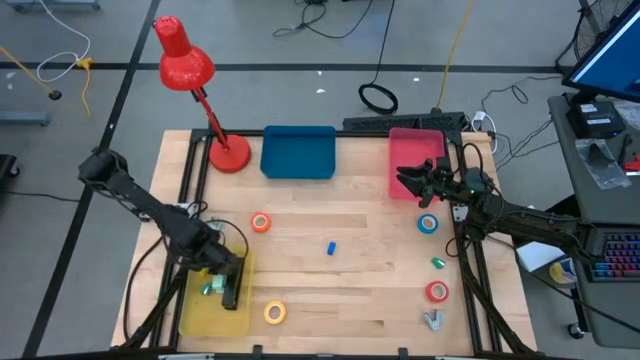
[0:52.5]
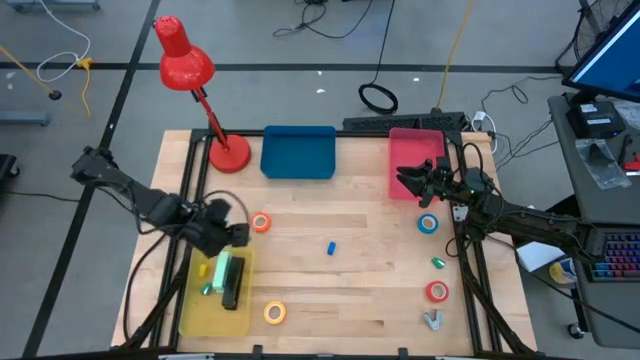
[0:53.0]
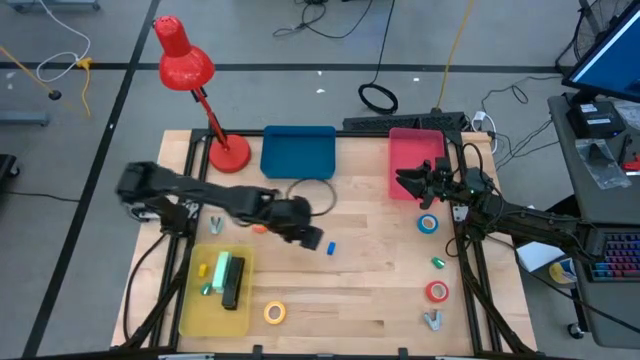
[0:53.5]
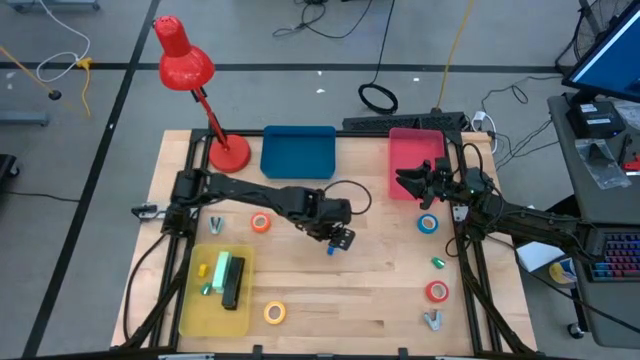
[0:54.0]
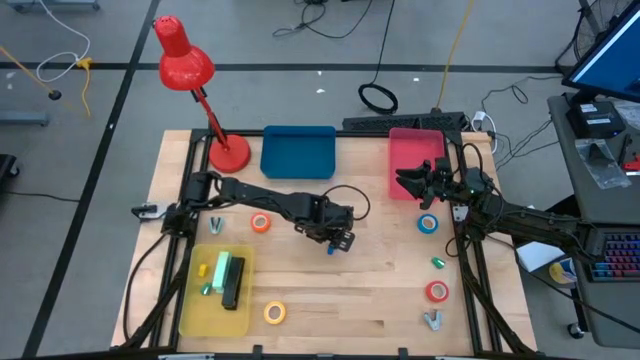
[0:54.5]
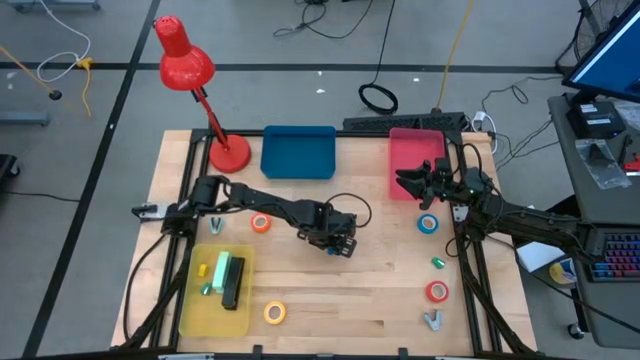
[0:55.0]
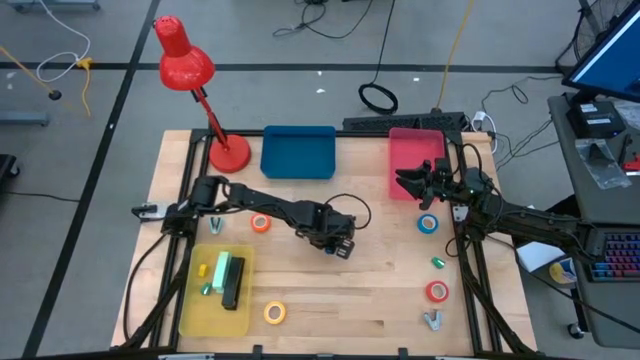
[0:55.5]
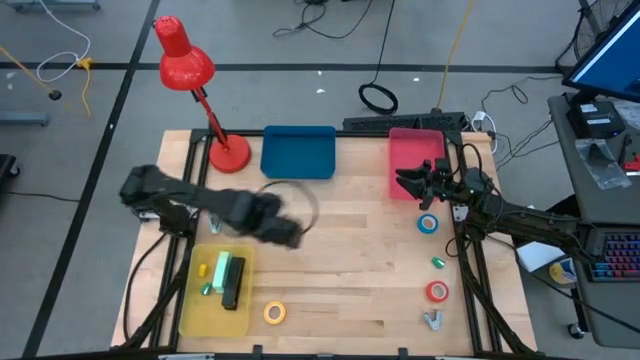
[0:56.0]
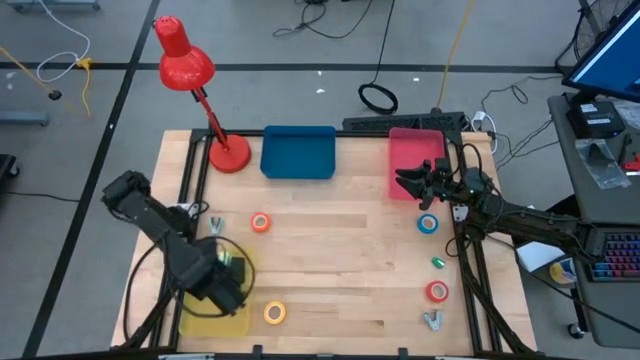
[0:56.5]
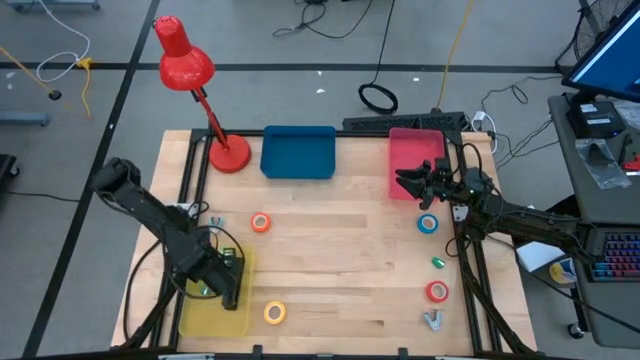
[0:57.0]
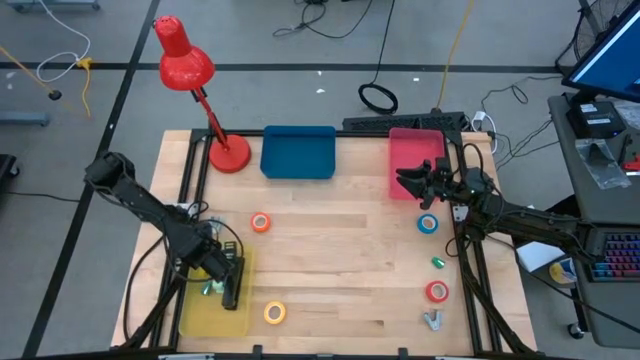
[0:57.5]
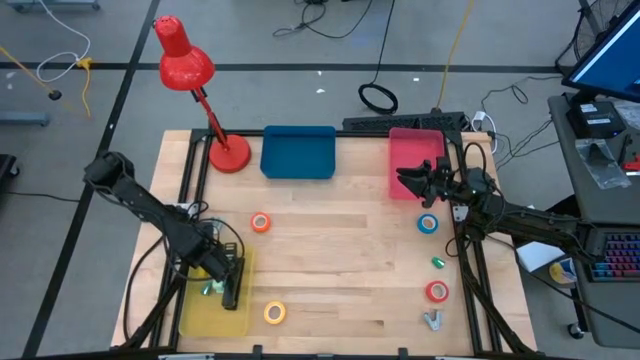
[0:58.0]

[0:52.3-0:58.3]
Task: Pick and place Stapler, Stapler remover, tape
Put the blue stapler into the yellow bin

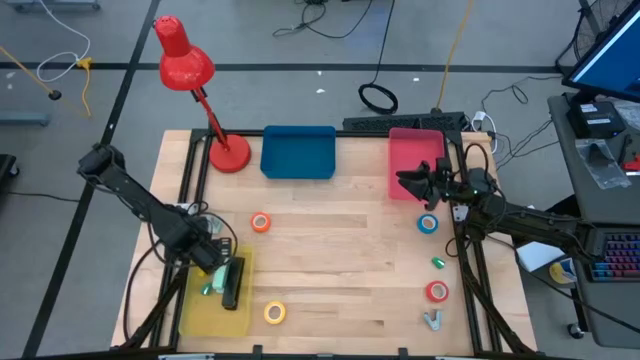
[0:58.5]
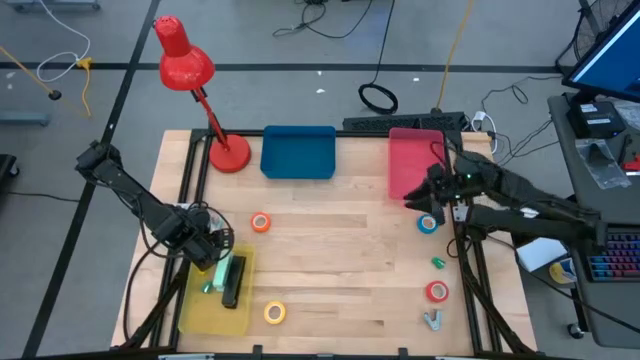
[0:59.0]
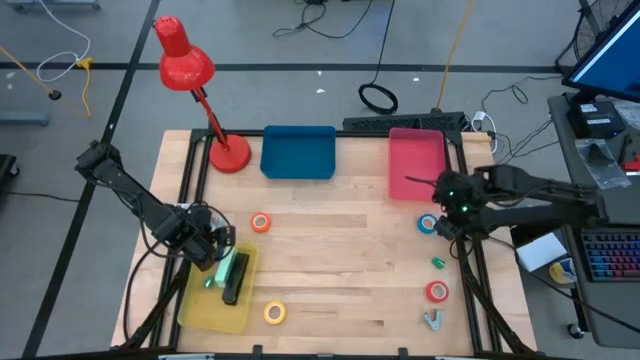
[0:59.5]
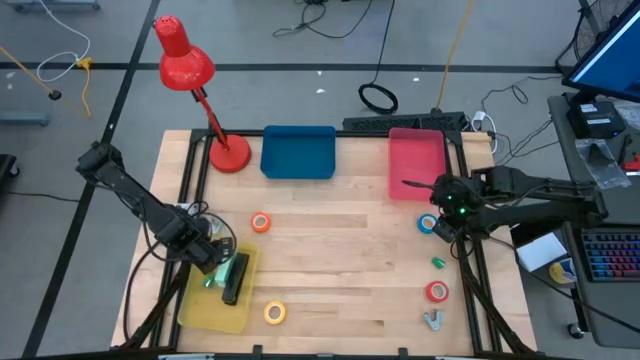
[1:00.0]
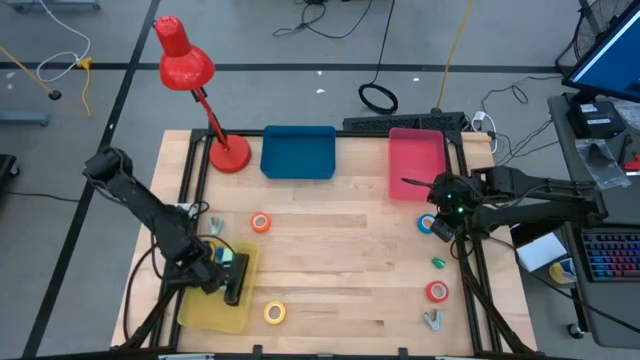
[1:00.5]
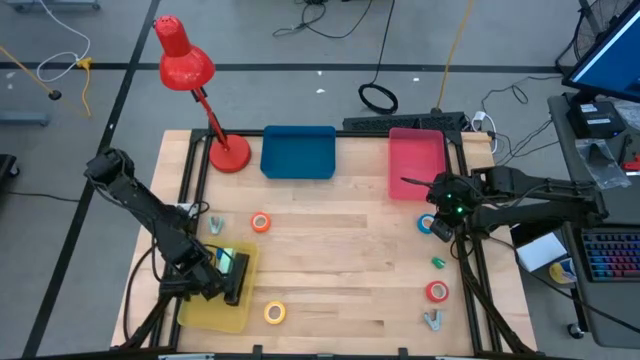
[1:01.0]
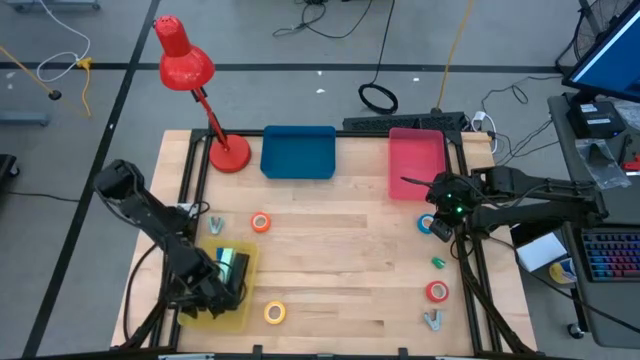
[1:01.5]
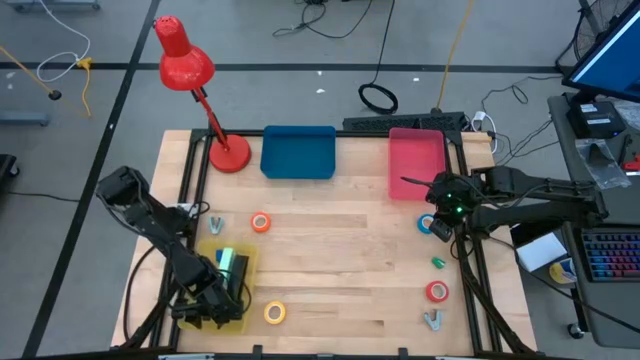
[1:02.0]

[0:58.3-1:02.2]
Adjust the yellow bin on the table

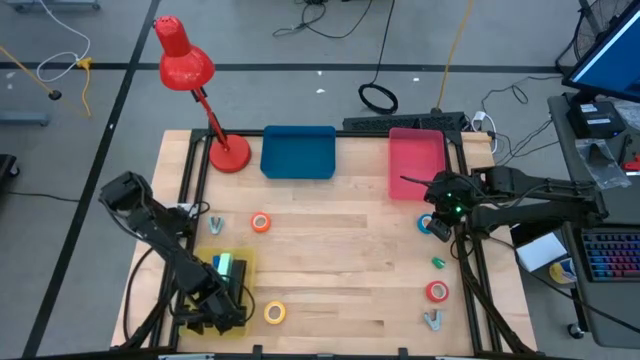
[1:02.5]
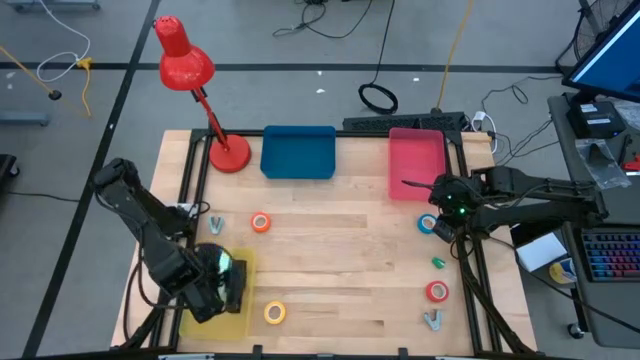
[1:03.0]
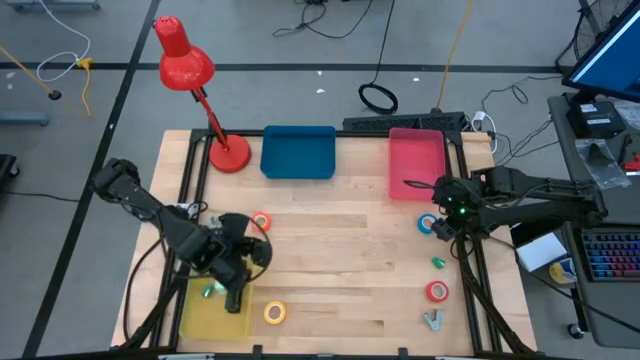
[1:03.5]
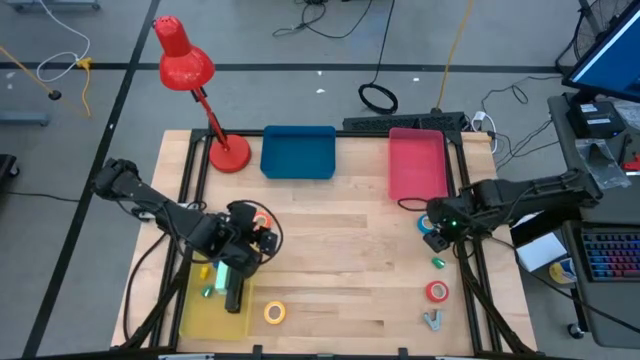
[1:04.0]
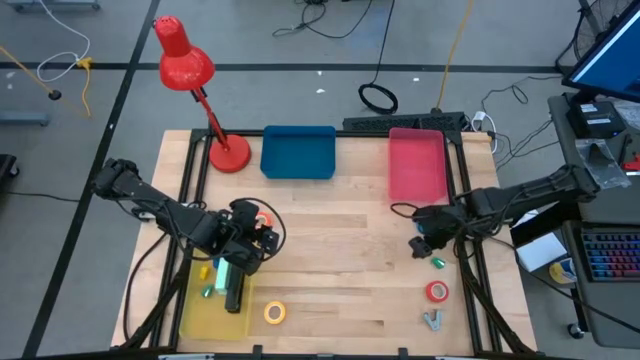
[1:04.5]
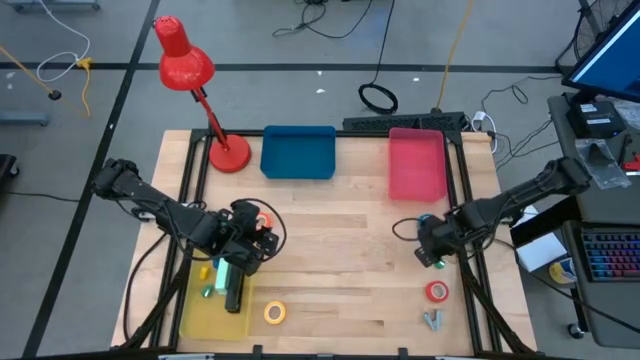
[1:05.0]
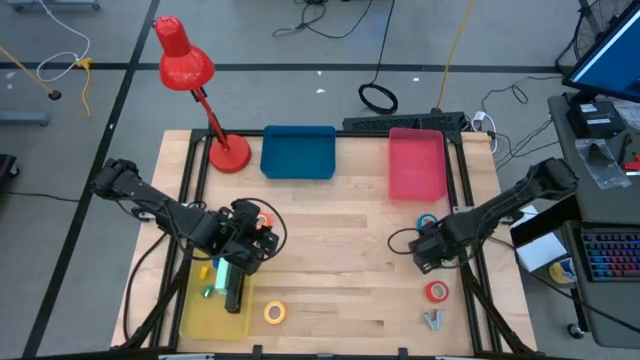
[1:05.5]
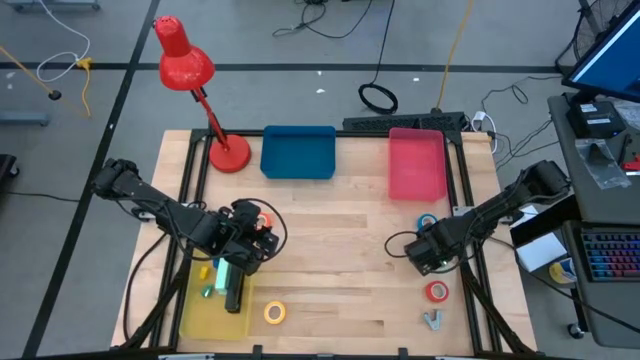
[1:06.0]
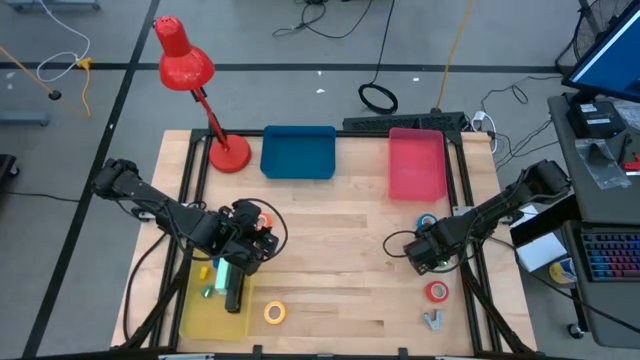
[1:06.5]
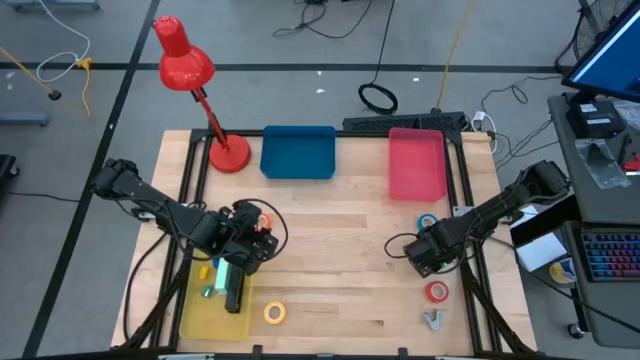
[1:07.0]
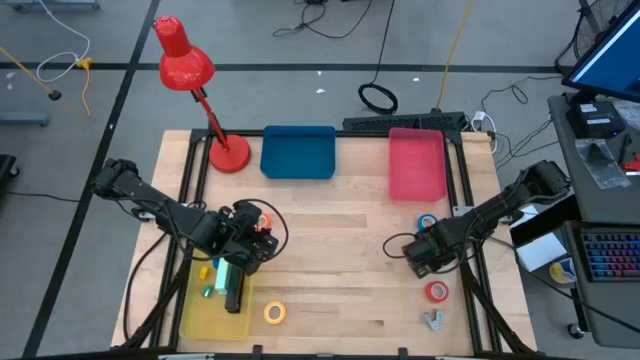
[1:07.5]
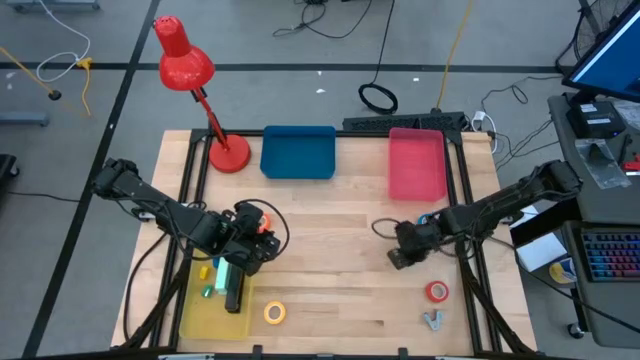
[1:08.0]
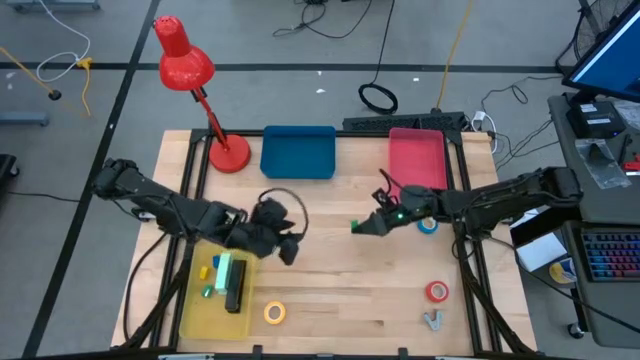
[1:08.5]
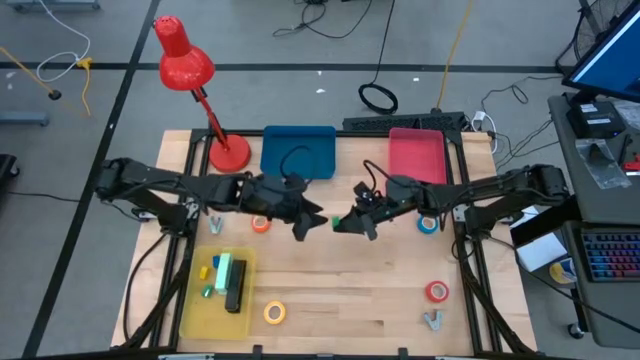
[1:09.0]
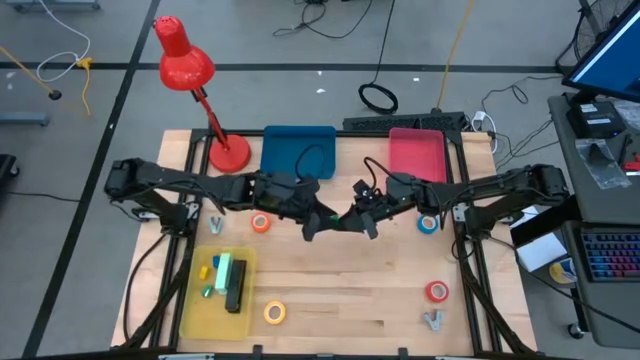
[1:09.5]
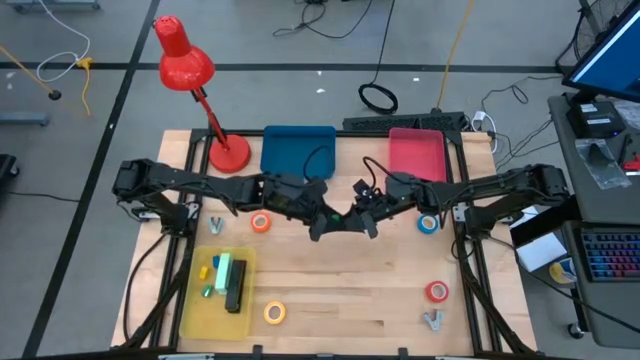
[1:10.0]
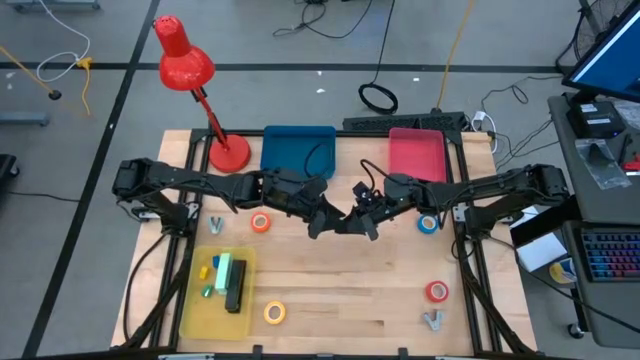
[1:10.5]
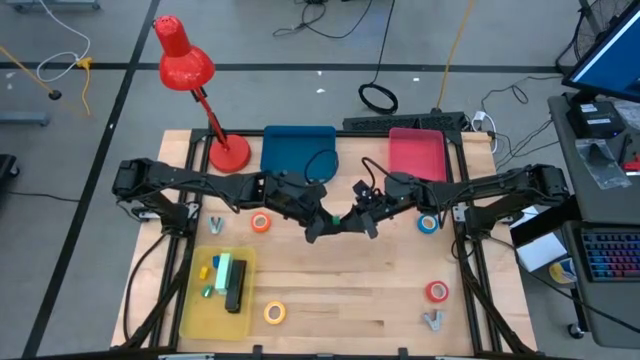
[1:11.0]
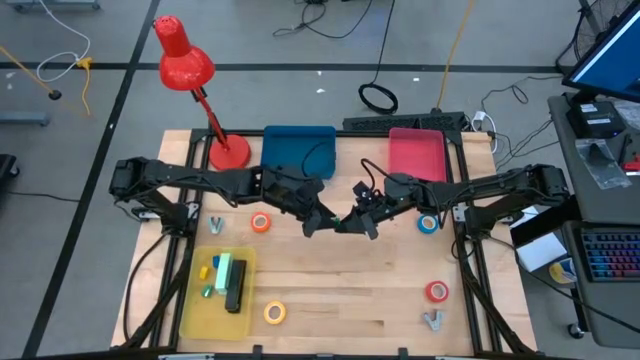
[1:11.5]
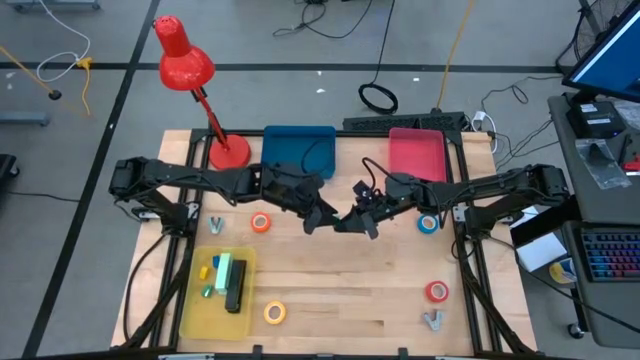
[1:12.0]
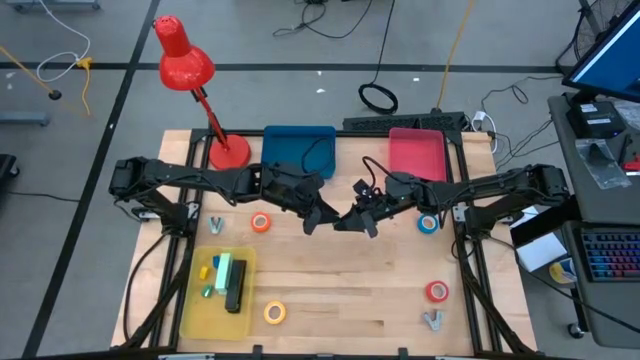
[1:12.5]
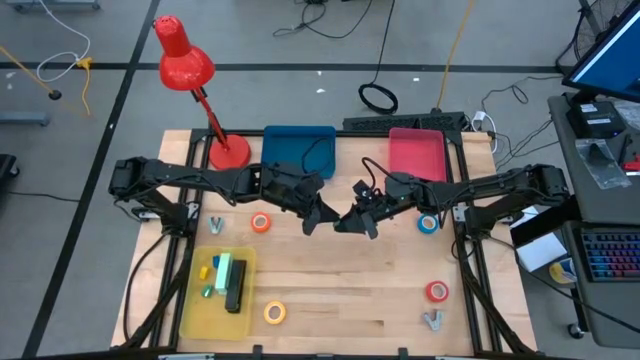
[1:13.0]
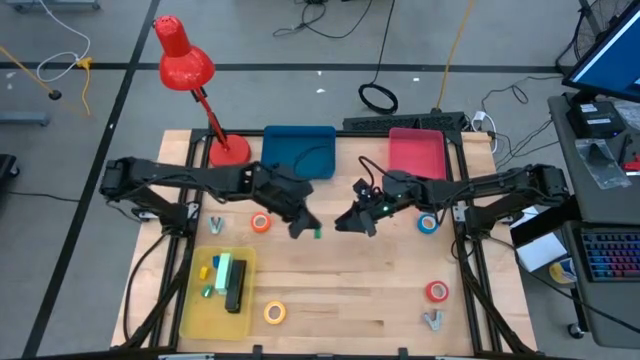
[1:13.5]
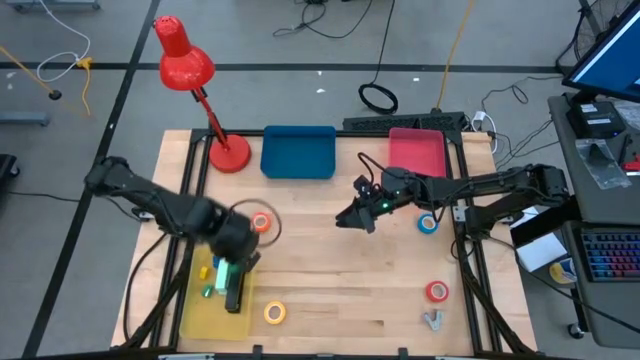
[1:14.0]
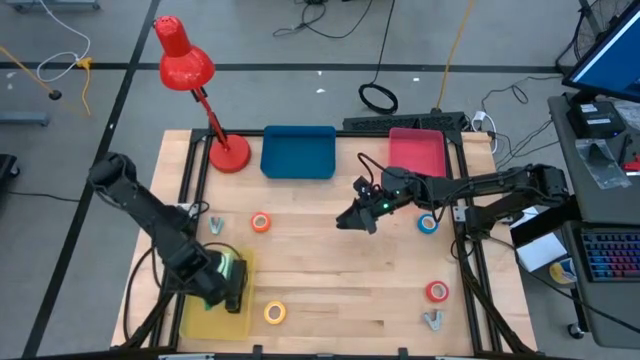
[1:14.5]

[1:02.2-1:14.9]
Put the green stapler into the yellow bin
